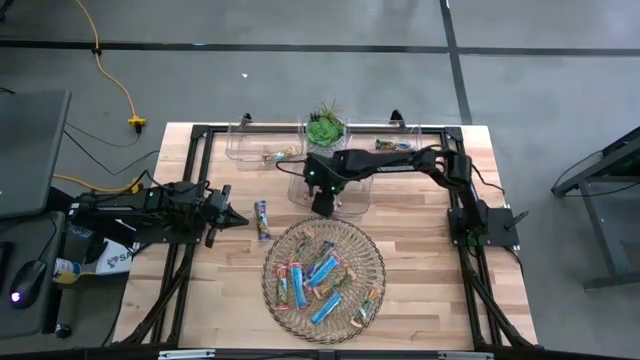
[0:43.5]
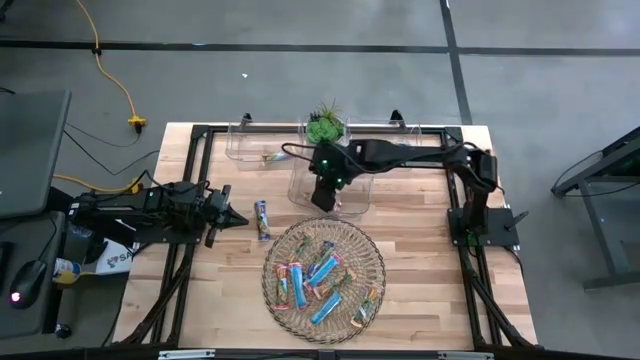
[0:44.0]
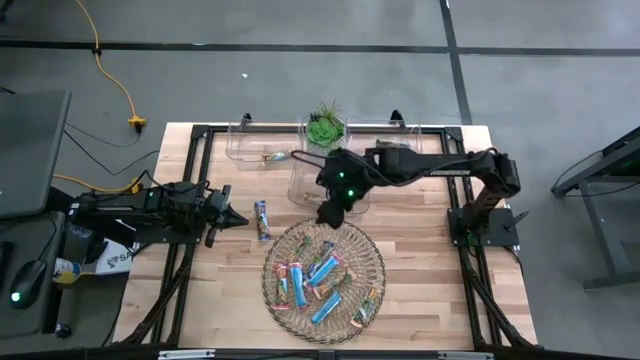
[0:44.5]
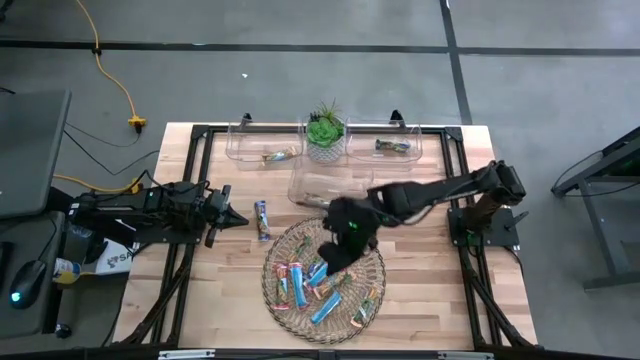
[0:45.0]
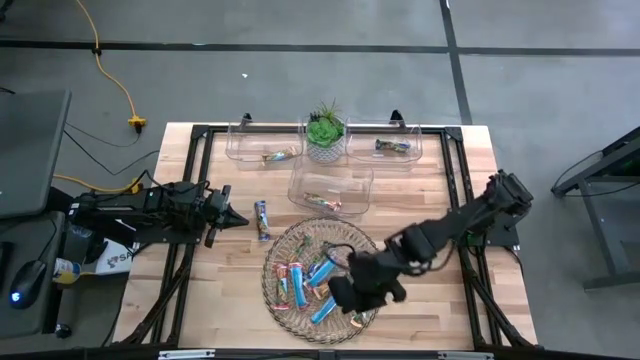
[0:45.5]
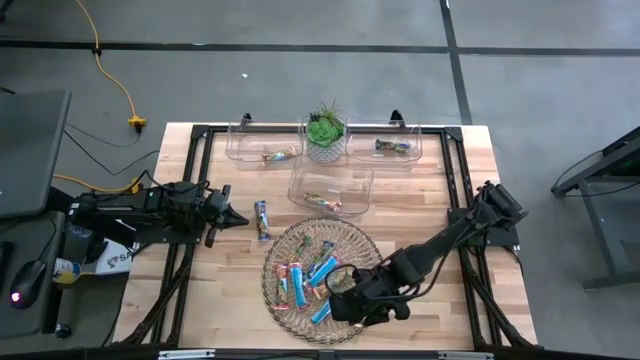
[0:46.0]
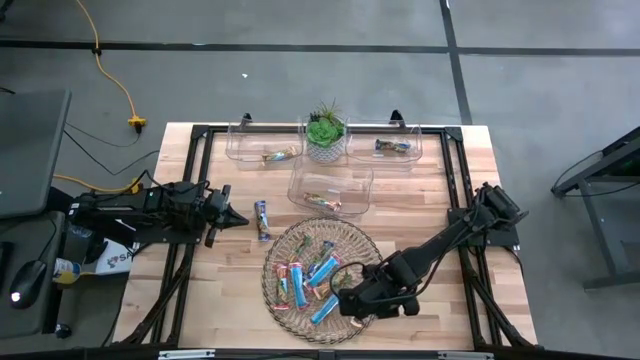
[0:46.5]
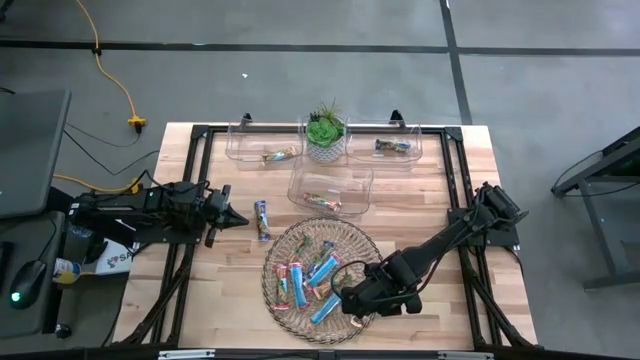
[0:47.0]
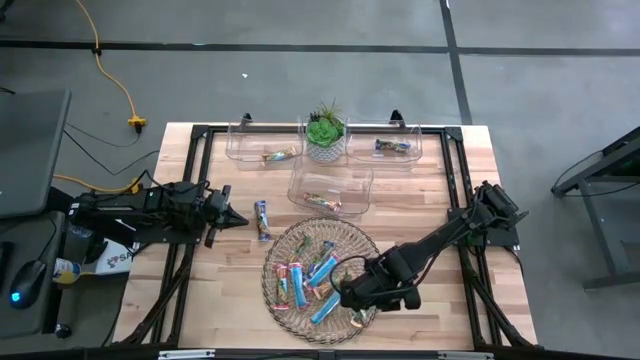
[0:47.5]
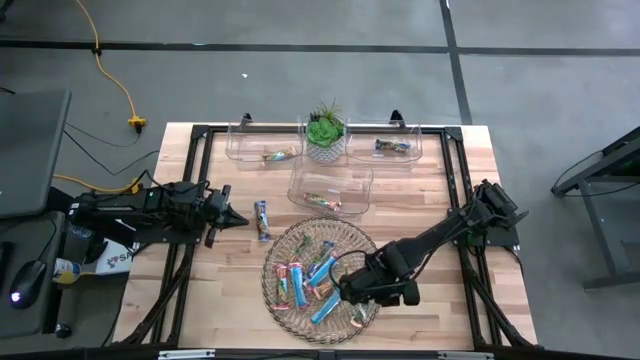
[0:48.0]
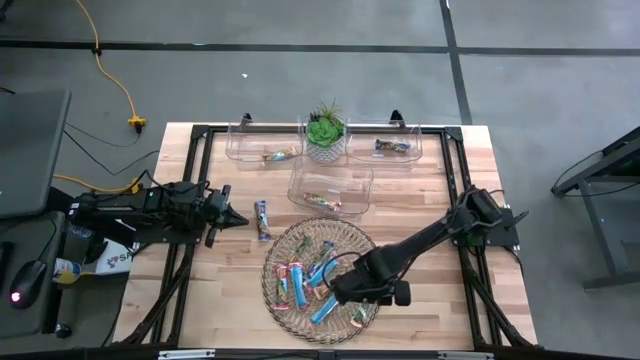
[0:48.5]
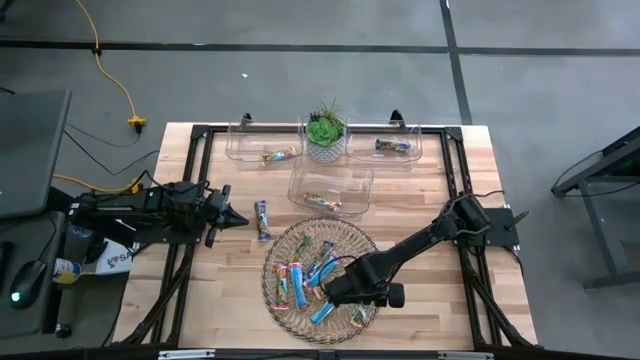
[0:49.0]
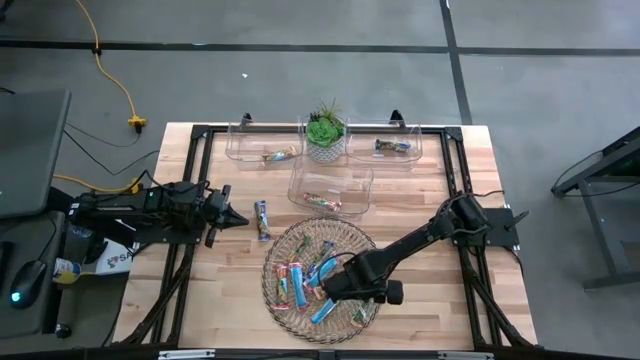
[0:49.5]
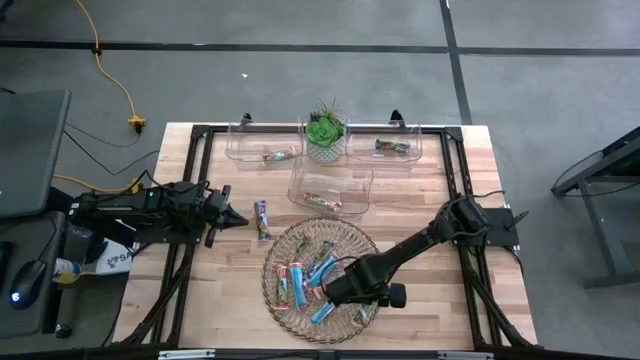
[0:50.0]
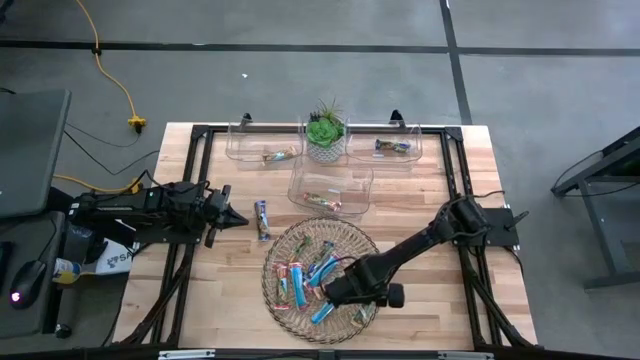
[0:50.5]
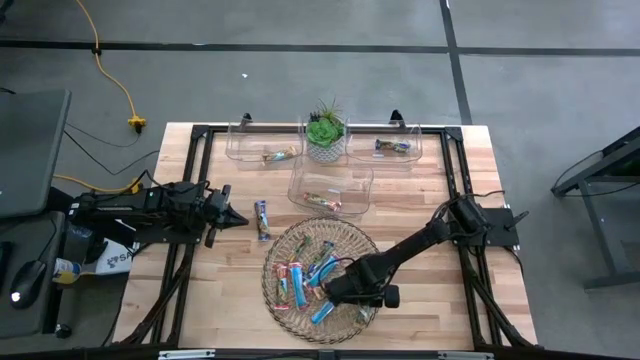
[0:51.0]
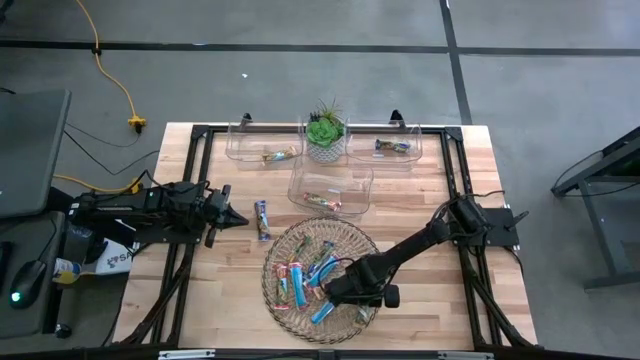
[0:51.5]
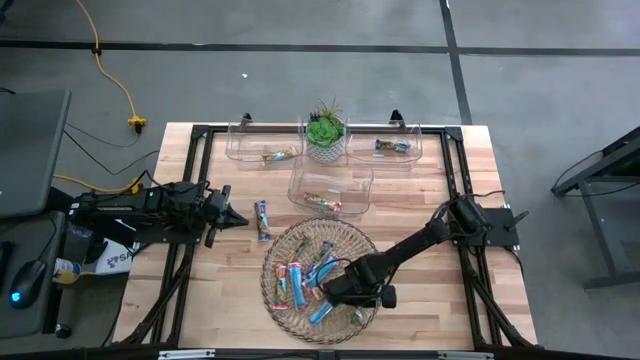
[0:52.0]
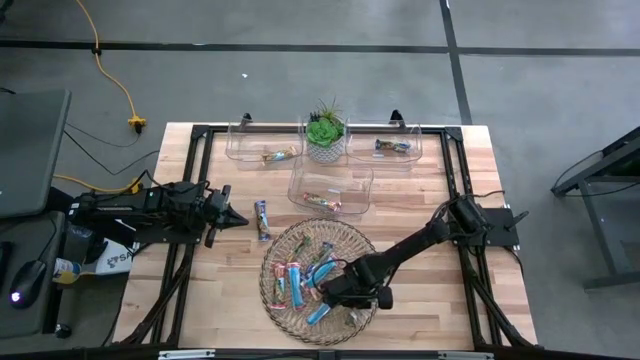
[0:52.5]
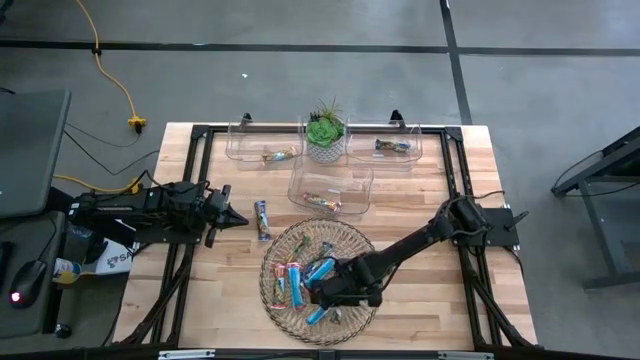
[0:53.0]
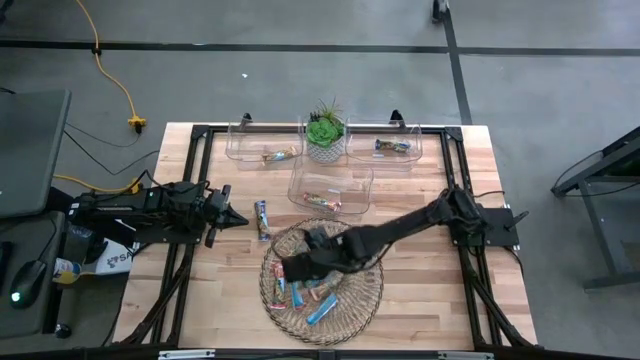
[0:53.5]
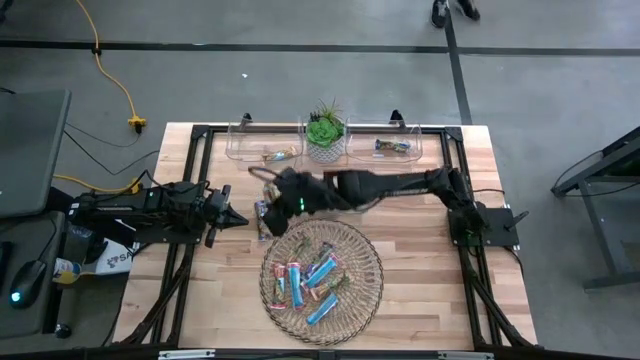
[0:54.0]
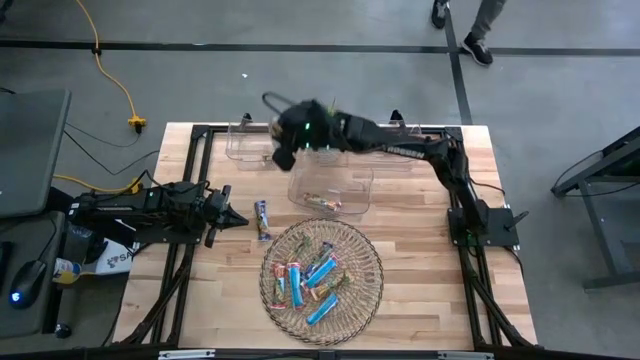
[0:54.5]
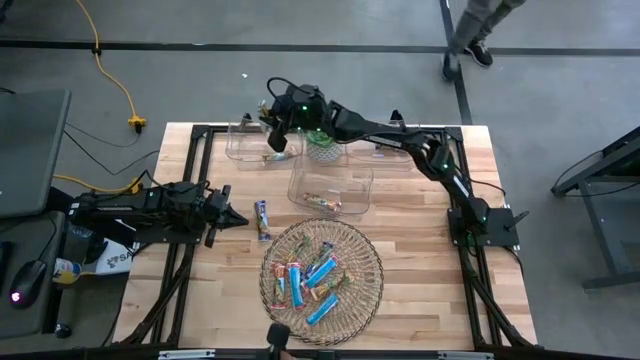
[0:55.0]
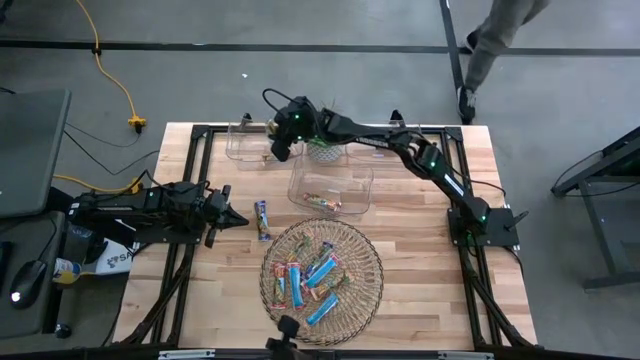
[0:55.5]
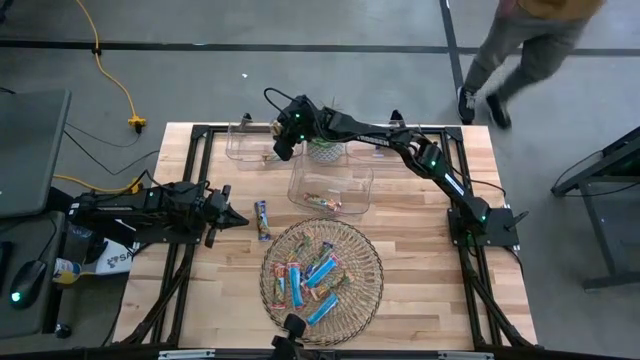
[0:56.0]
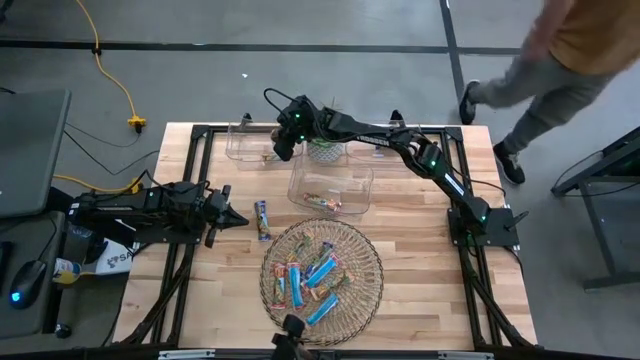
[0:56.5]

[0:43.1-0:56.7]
Task: Pick and place Granola Bars by type
Put the yellow granola bar into the top left transparent bin

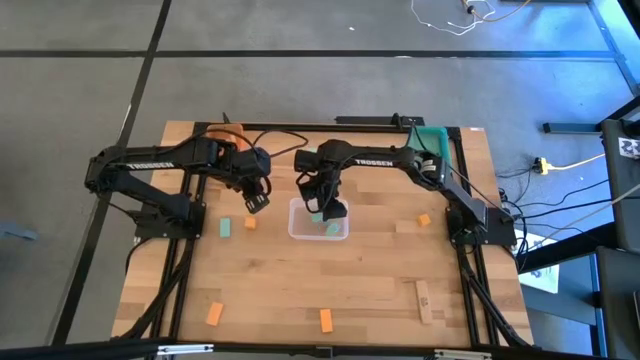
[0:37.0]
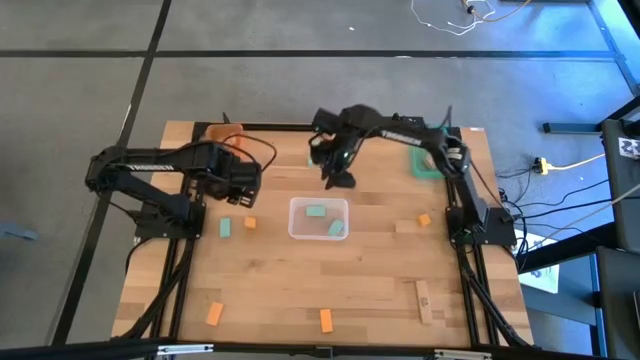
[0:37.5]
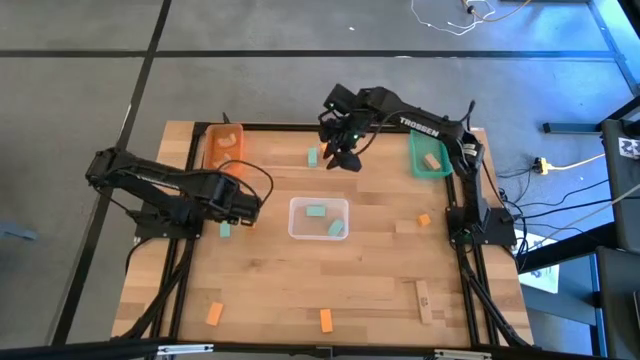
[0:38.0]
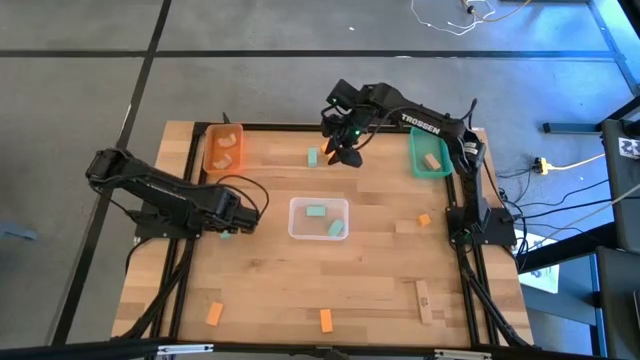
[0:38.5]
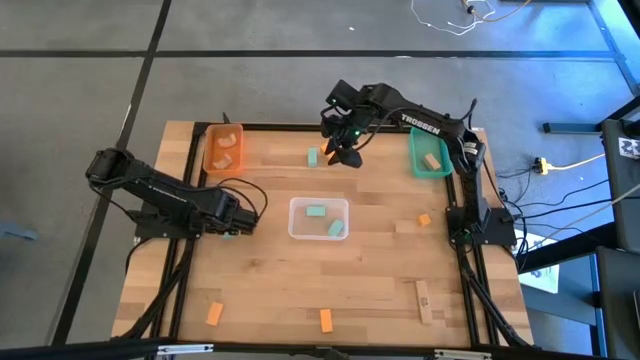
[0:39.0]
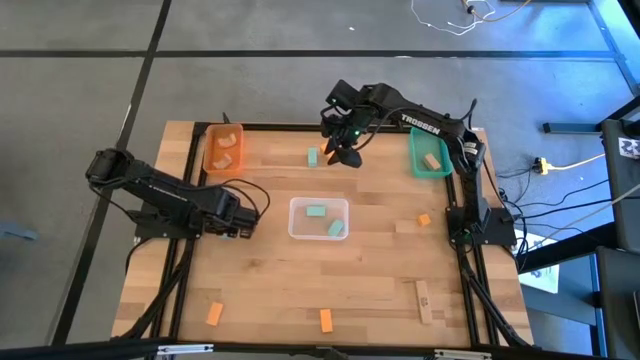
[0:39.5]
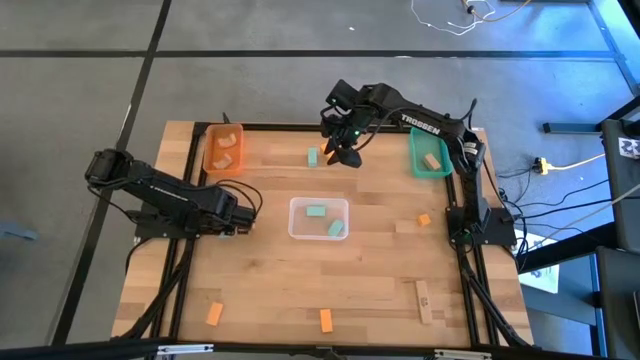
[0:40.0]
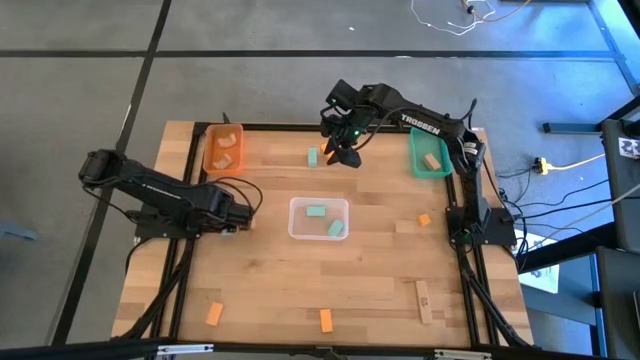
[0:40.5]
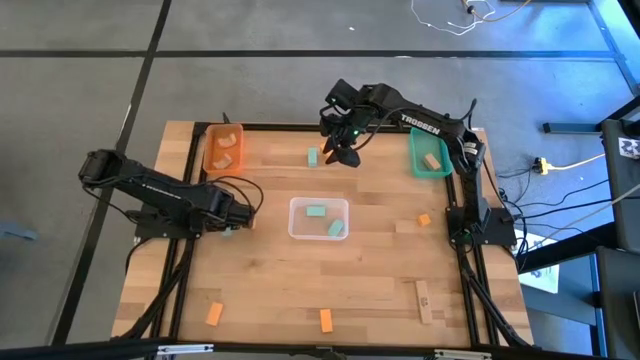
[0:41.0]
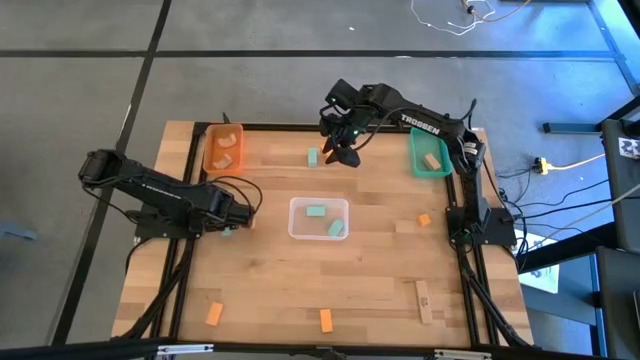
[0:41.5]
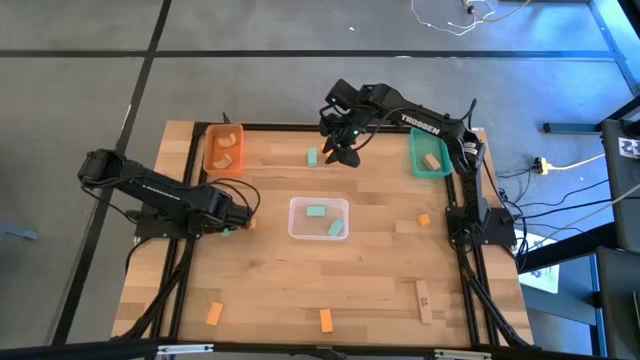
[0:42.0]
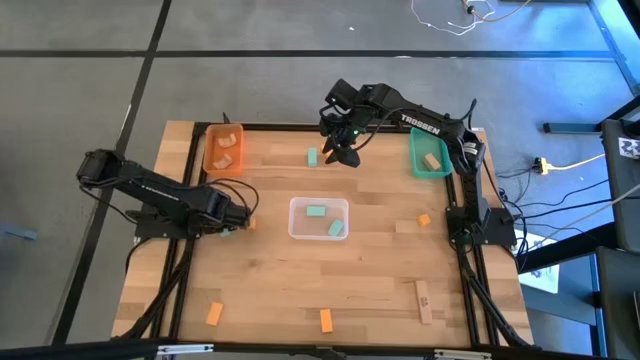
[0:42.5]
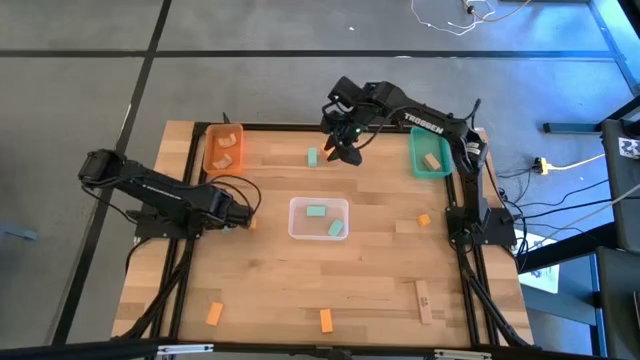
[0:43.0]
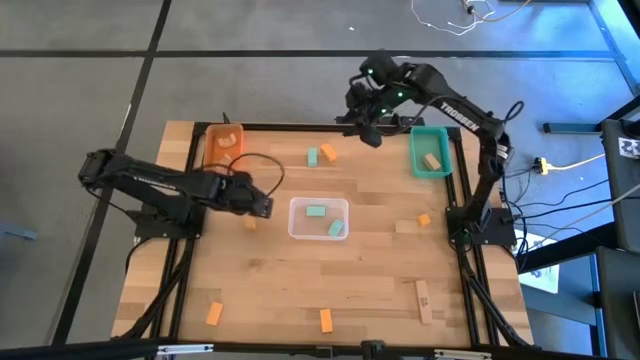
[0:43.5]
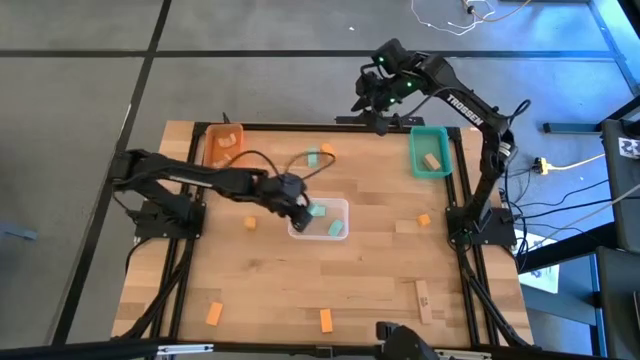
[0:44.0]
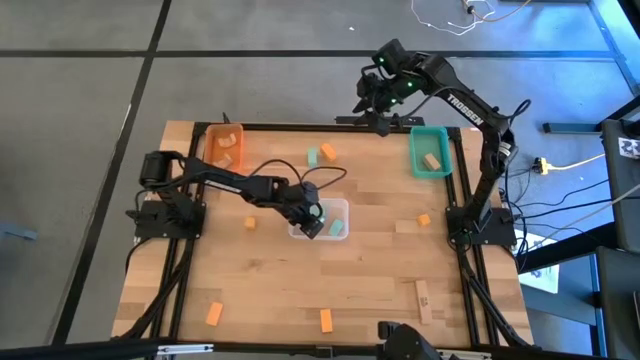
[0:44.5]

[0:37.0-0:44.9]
Task: Sort & place blocks by color
Put the blue block into the transparent bin
